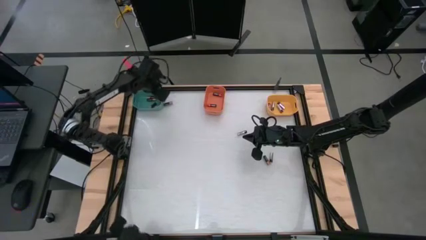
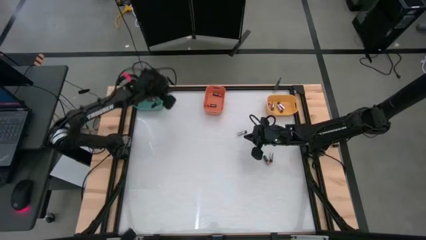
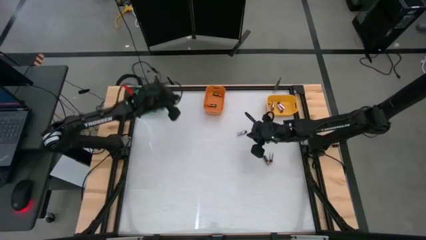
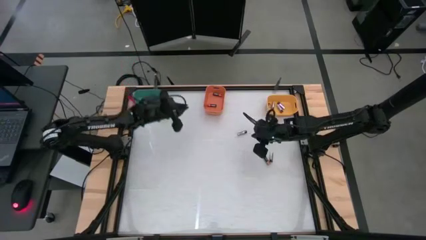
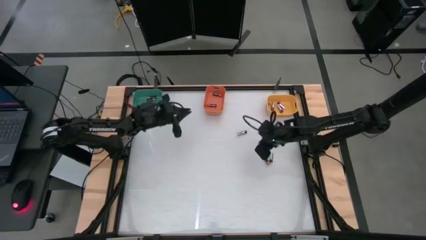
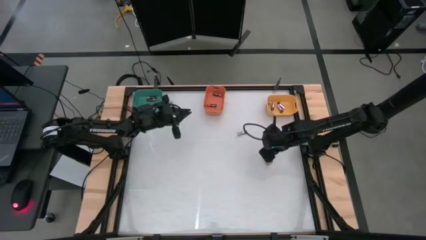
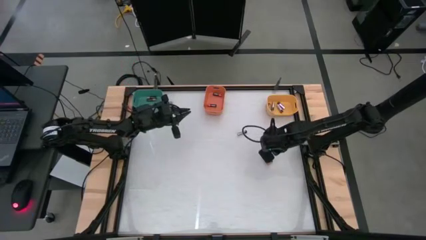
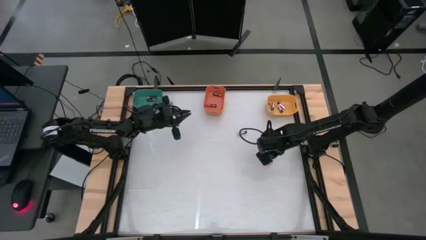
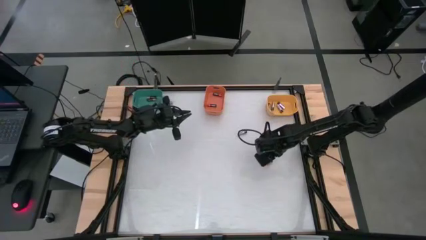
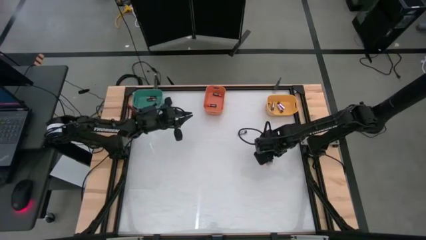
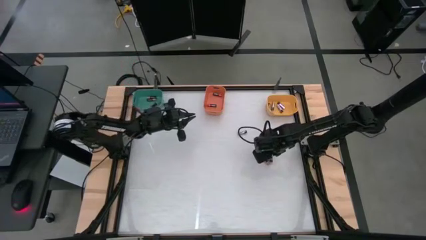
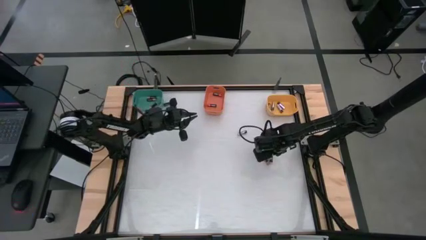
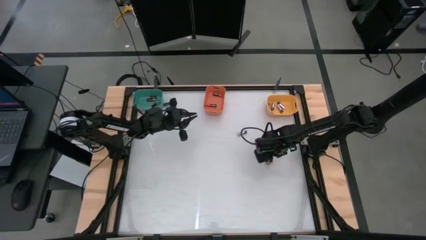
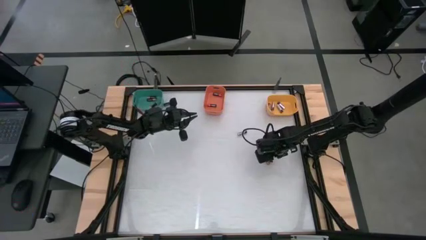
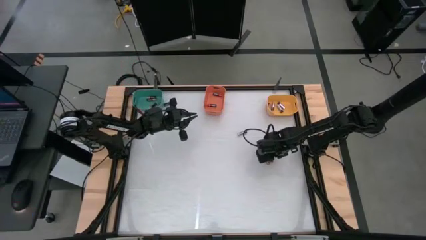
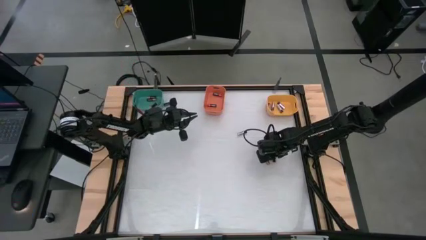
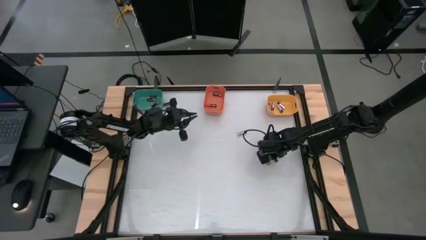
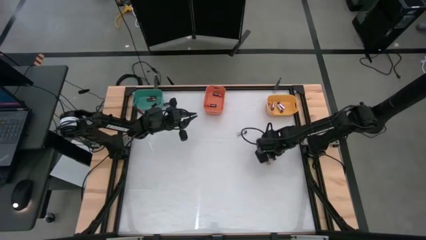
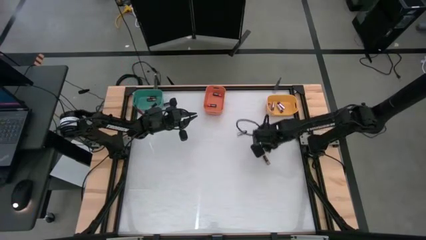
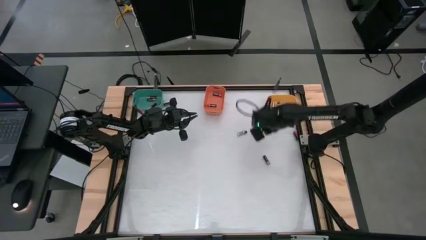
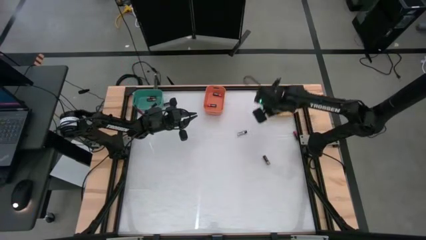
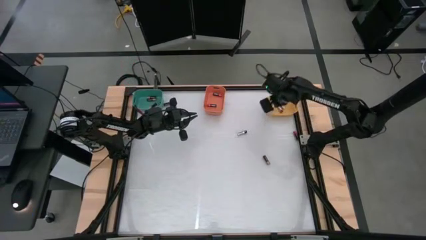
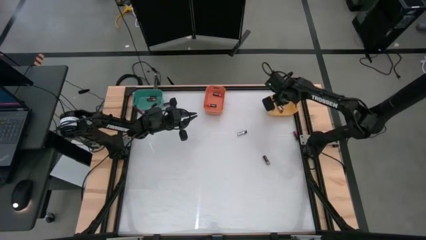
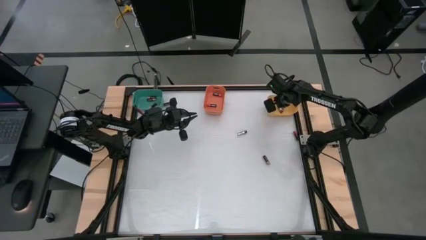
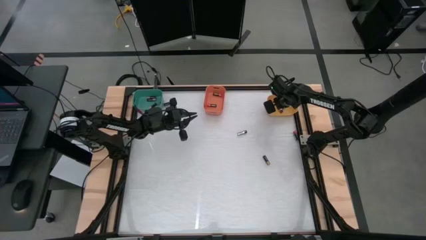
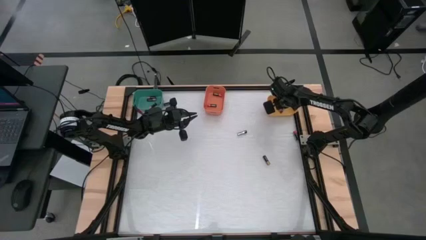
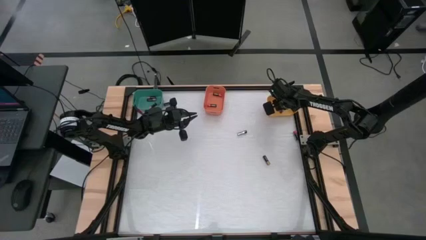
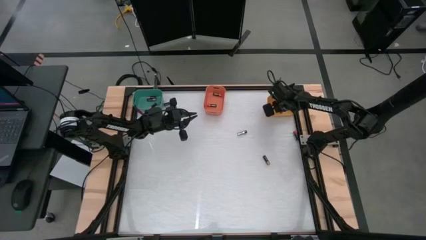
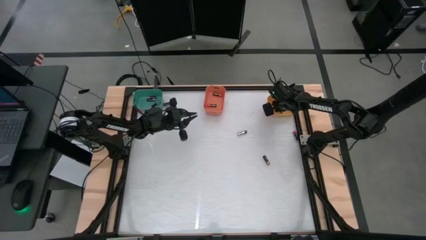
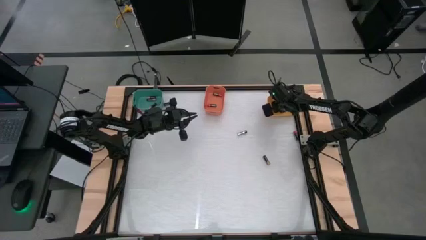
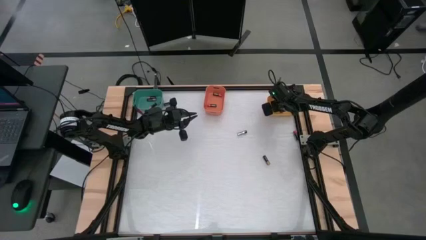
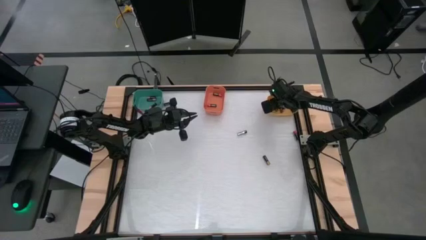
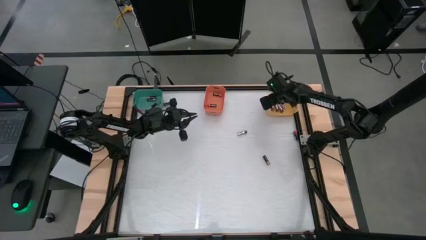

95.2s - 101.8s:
Task: Sort batteries
Put the bottom silver battery into the yellow container

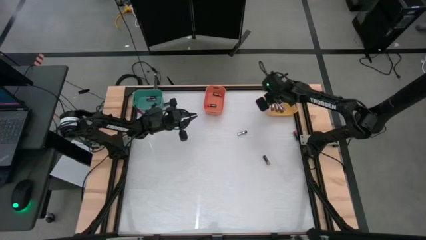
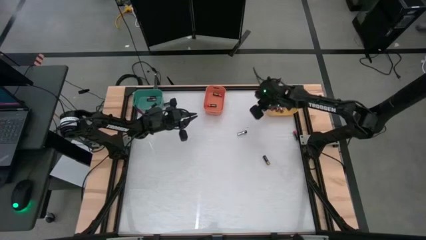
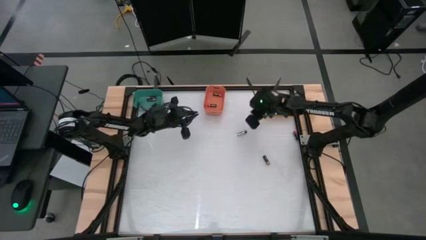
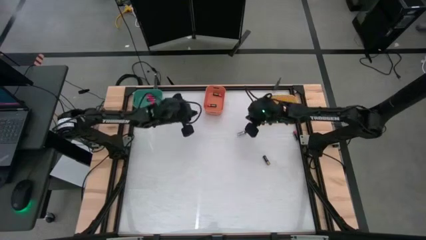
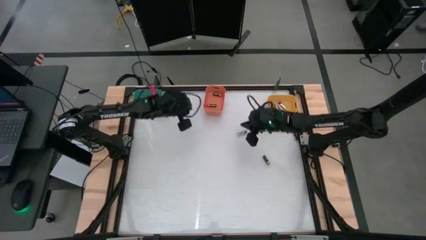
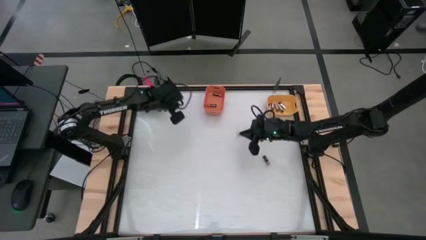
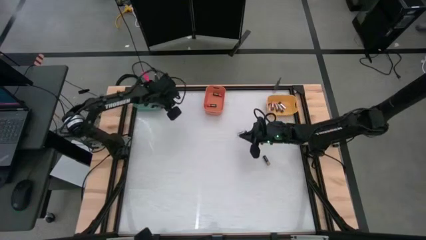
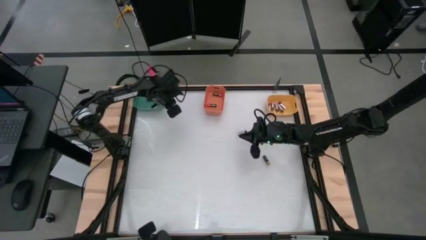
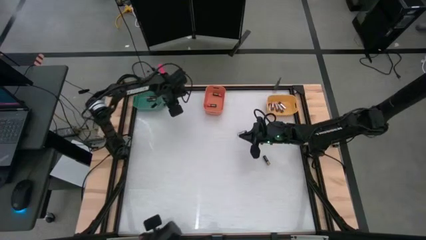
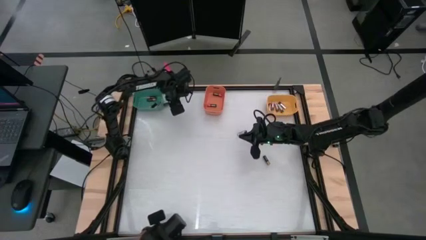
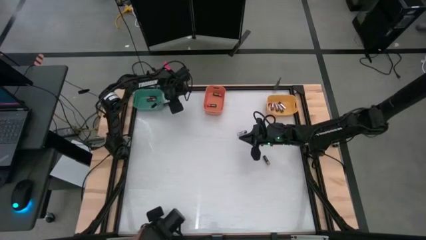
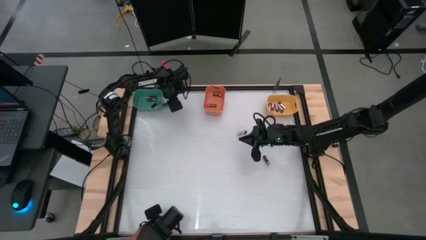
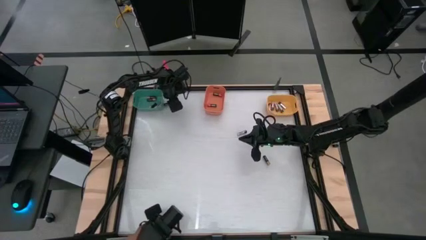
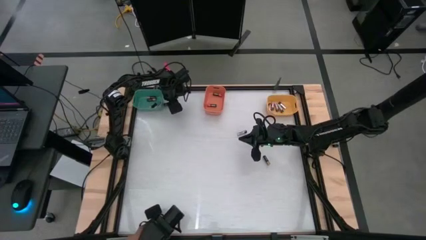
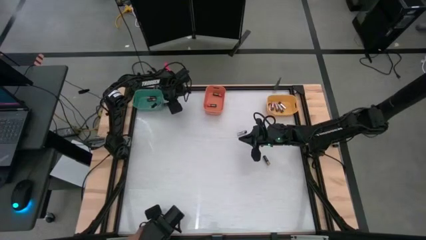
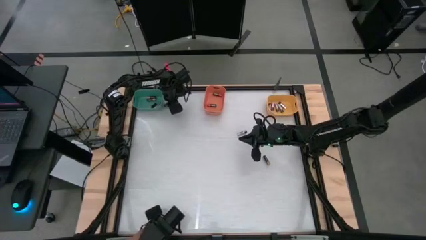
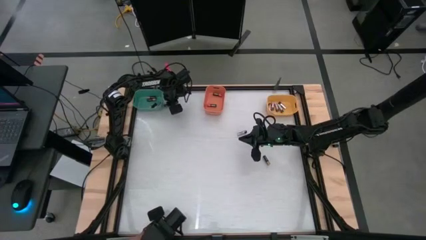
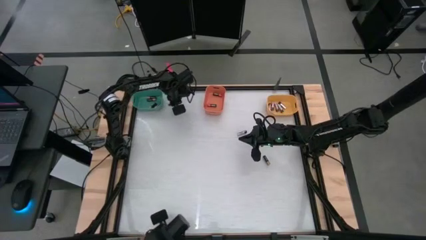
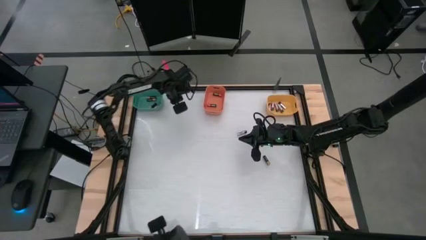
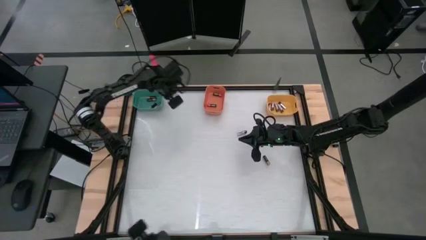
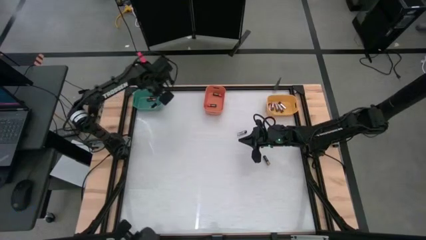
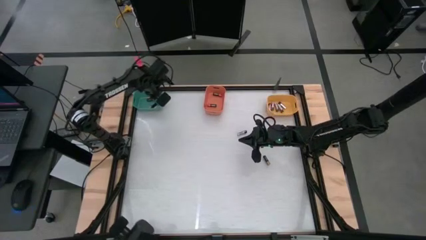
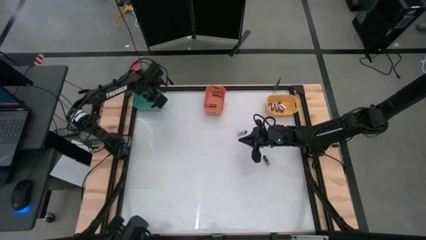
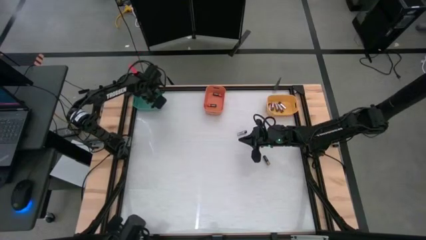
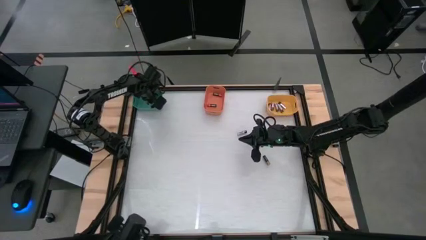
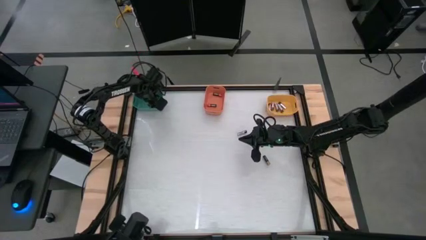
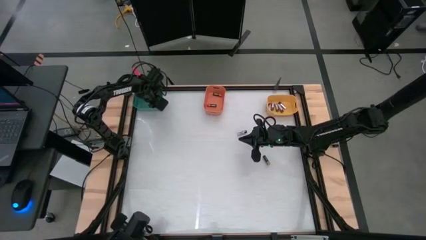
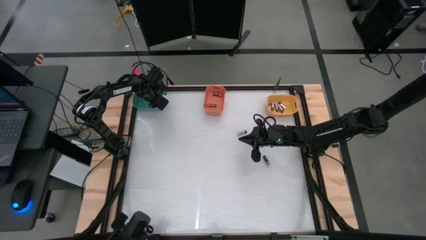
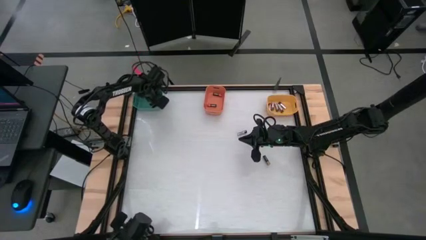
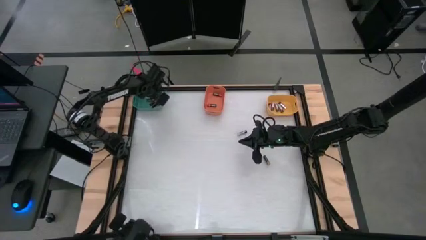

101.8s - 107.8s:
Put the top copper battery into the green container

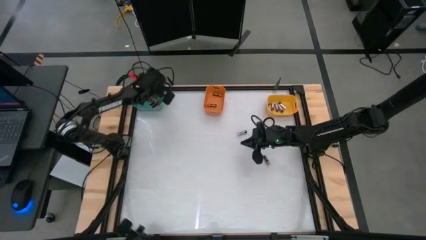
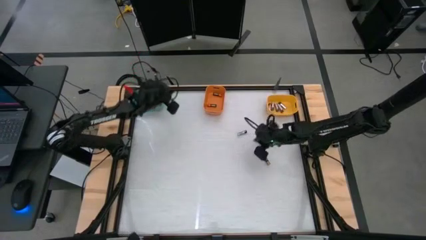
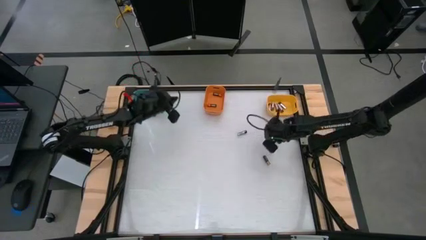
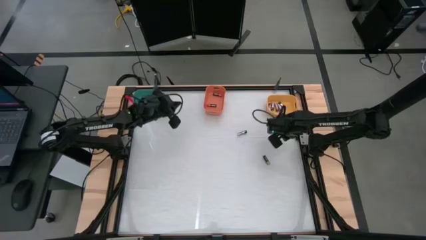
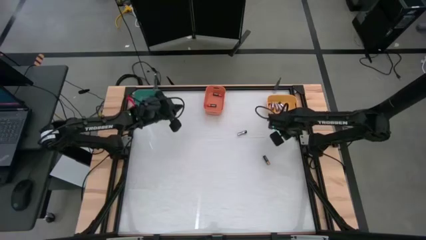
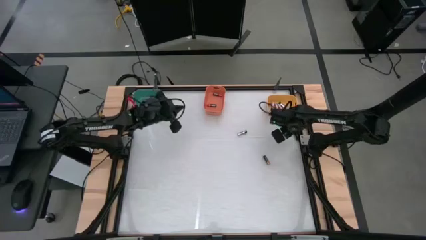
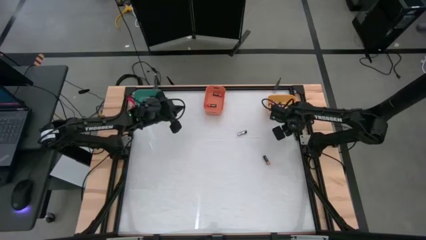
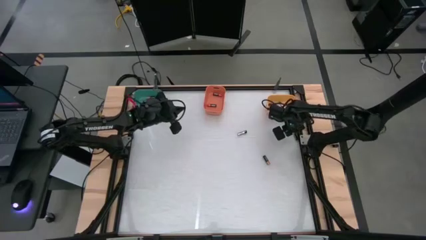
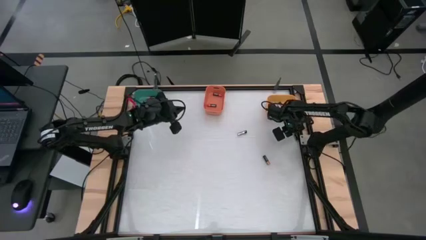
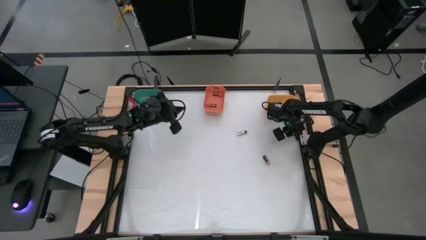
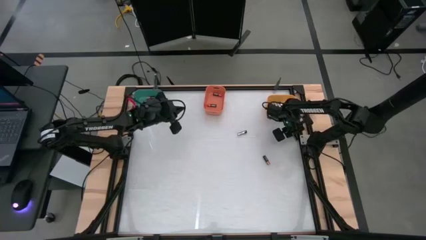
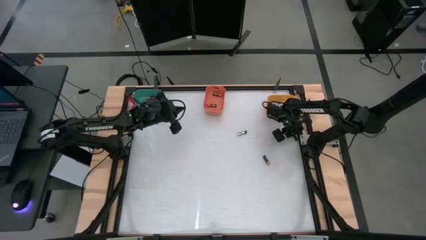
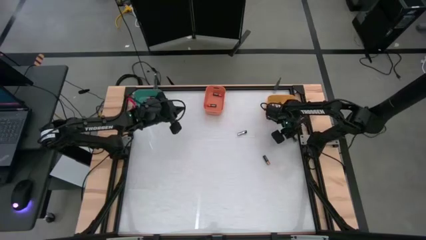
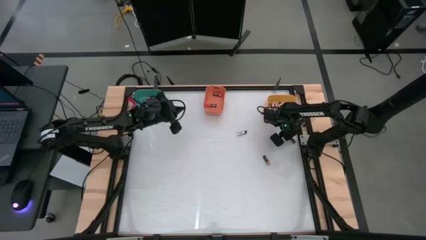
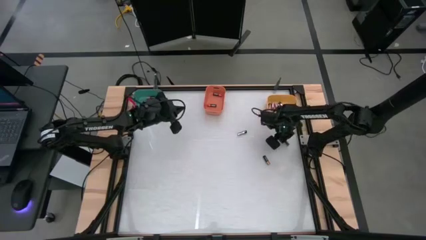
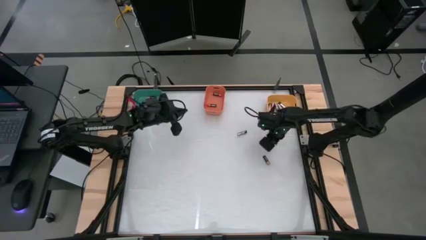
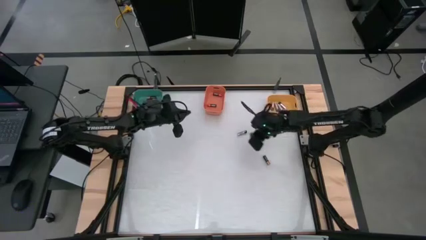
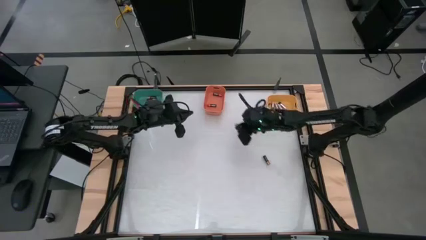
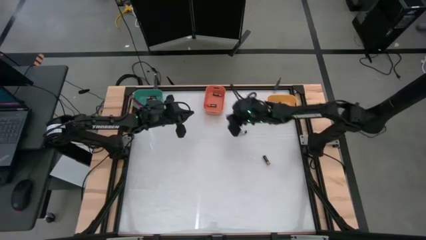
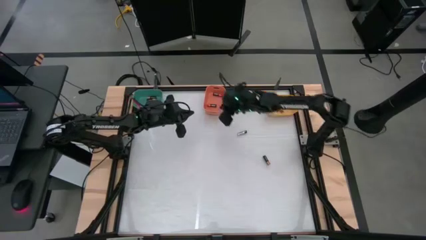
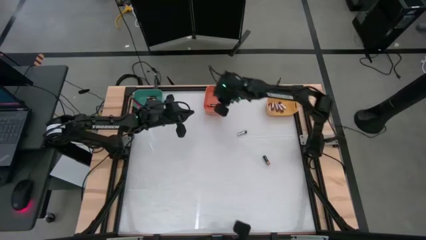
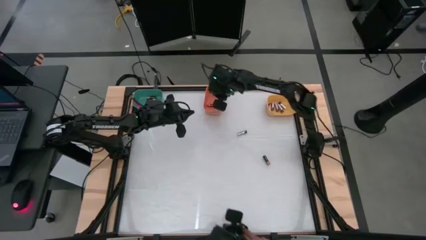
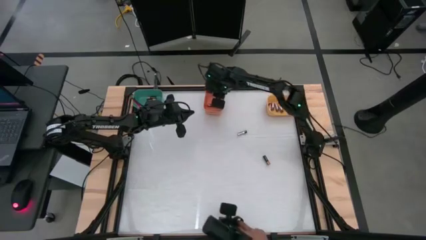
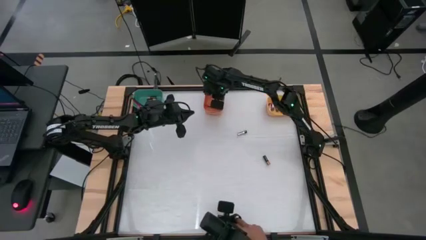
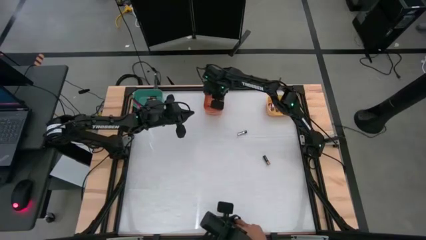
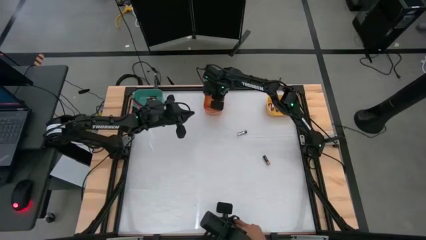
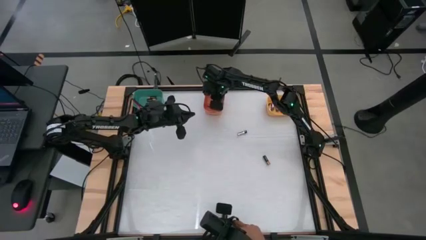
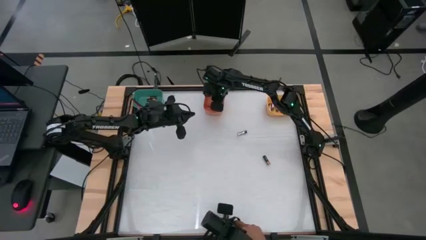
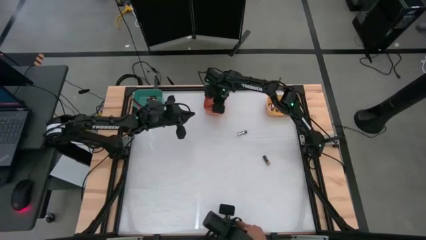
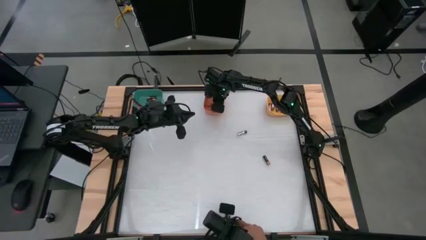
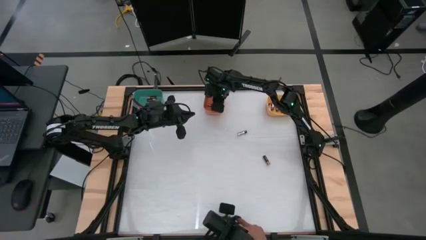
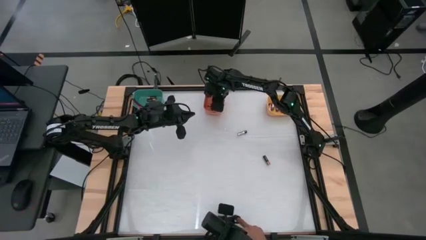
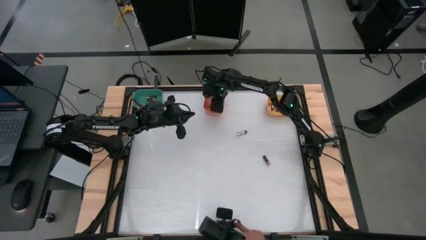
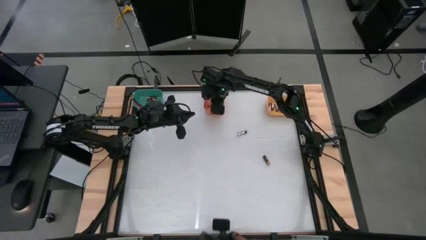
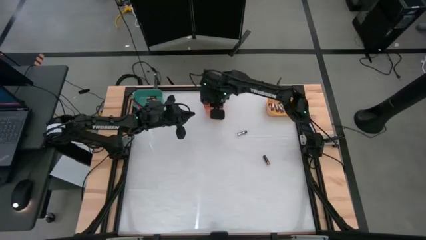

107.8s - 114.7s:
Put the red battery into the orange container
